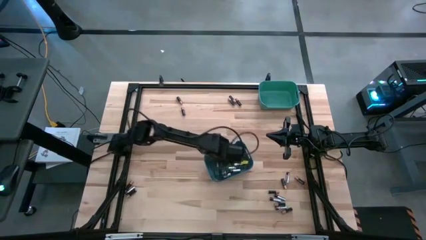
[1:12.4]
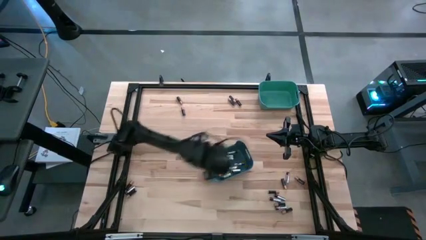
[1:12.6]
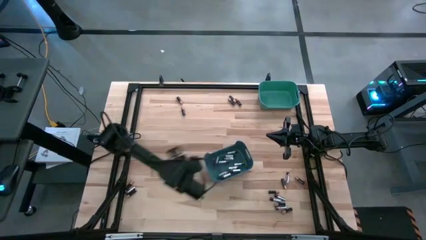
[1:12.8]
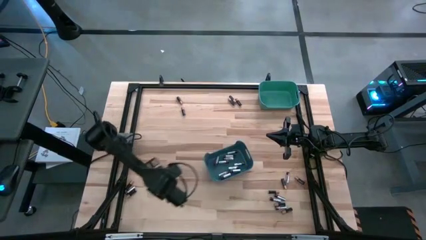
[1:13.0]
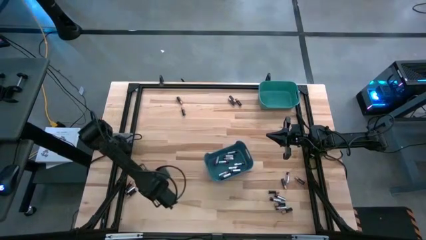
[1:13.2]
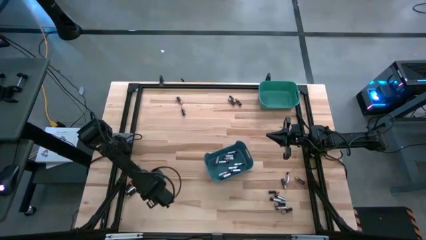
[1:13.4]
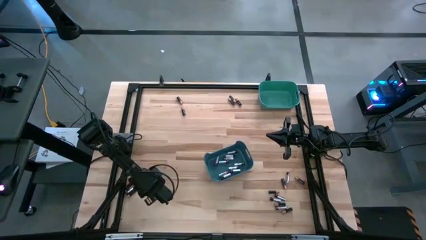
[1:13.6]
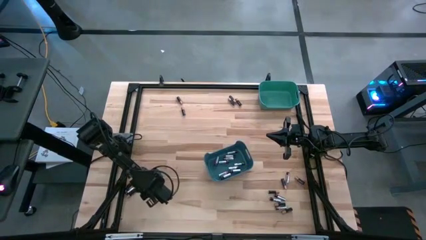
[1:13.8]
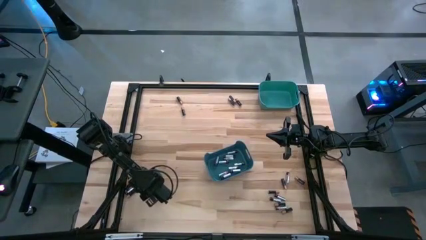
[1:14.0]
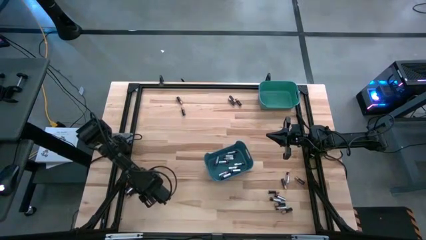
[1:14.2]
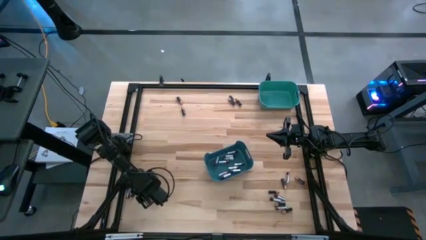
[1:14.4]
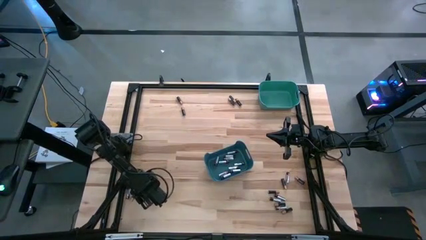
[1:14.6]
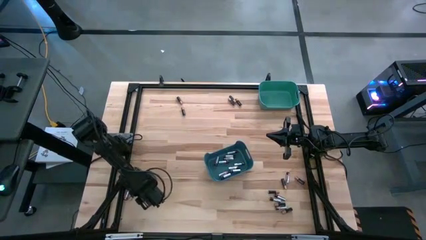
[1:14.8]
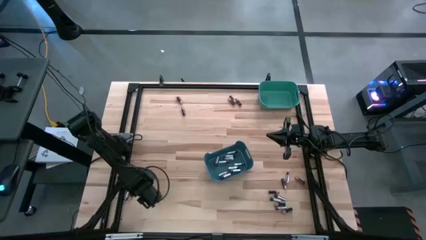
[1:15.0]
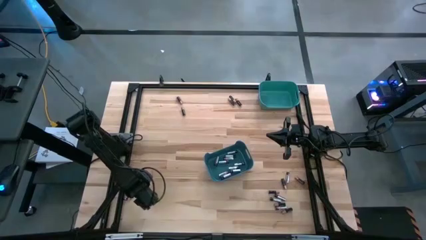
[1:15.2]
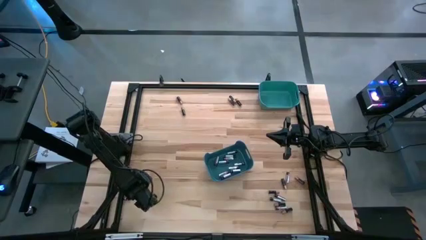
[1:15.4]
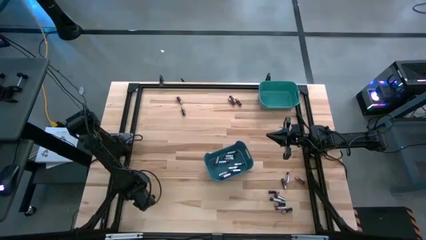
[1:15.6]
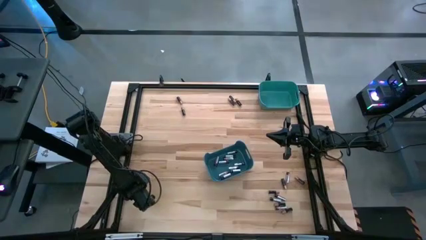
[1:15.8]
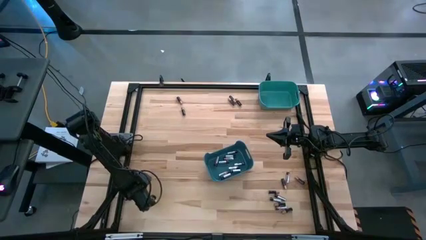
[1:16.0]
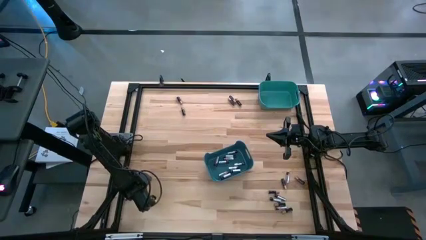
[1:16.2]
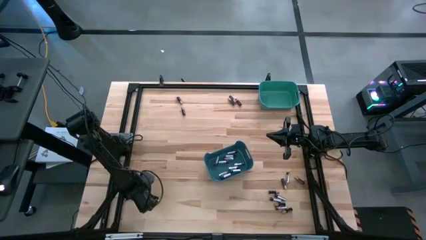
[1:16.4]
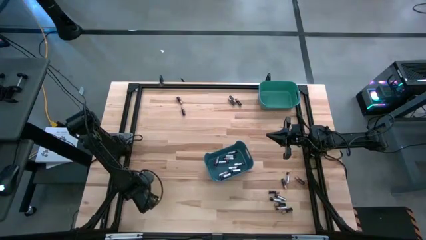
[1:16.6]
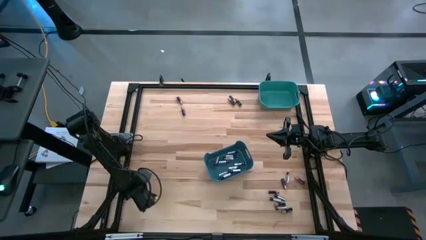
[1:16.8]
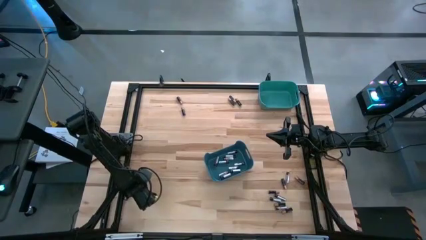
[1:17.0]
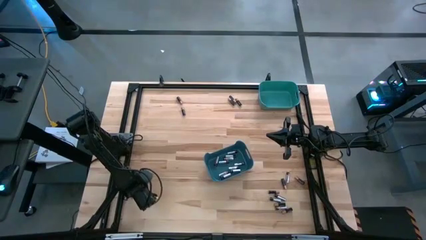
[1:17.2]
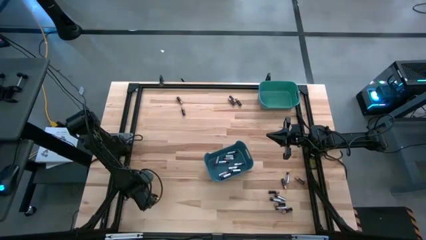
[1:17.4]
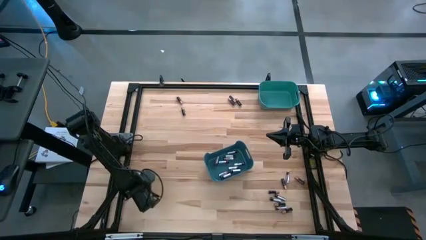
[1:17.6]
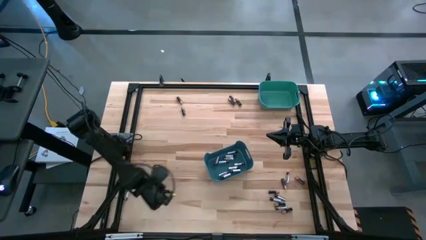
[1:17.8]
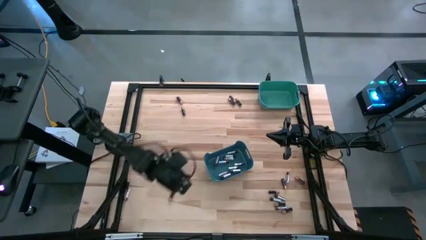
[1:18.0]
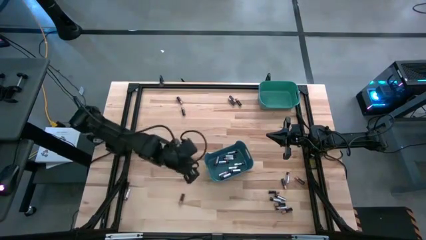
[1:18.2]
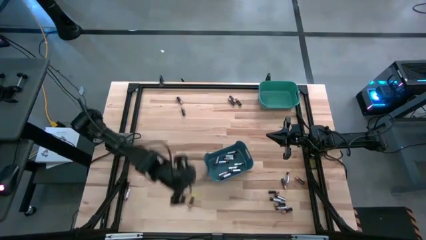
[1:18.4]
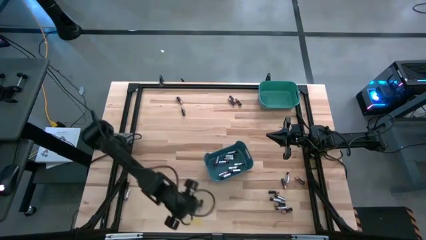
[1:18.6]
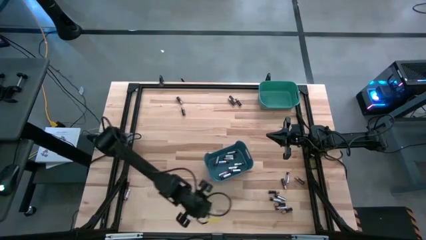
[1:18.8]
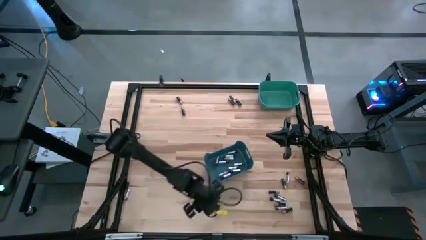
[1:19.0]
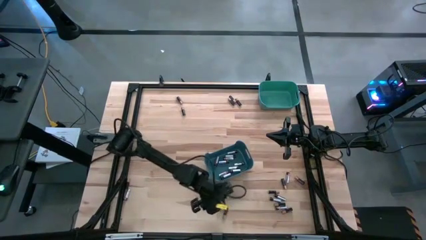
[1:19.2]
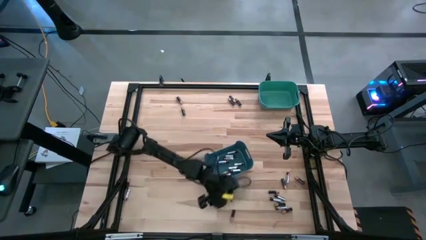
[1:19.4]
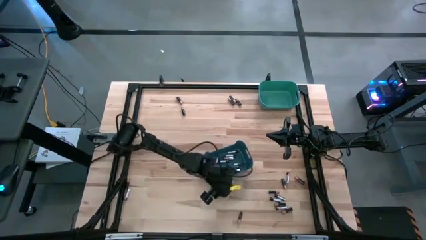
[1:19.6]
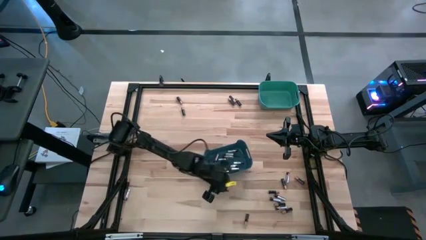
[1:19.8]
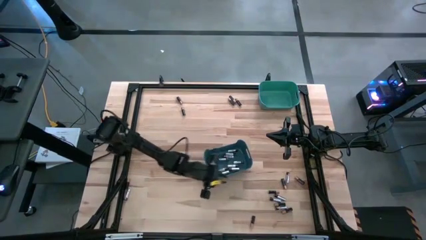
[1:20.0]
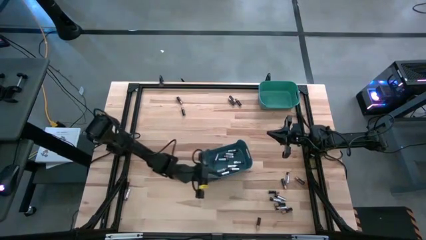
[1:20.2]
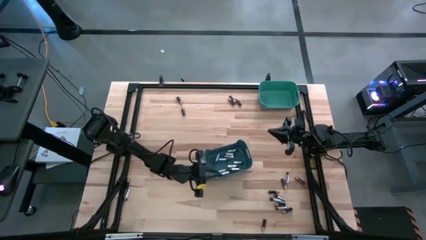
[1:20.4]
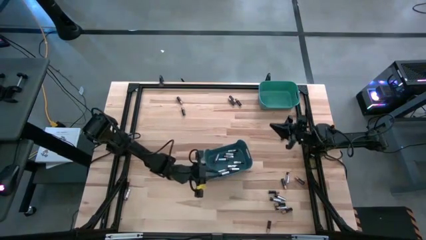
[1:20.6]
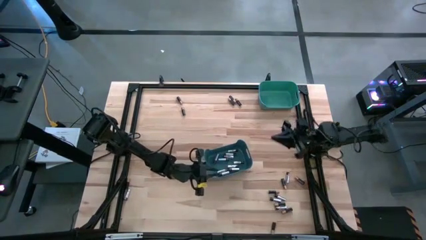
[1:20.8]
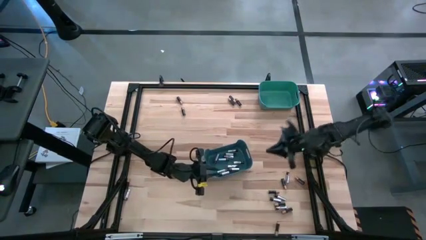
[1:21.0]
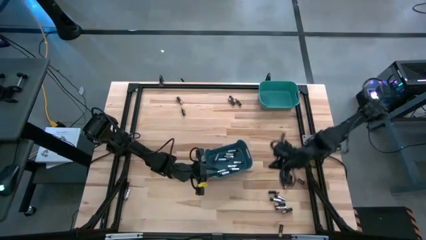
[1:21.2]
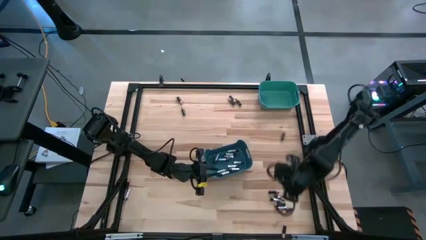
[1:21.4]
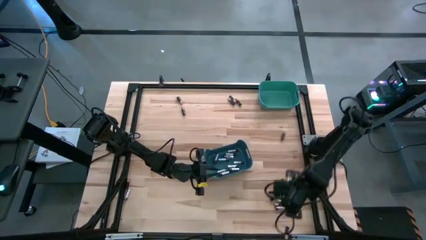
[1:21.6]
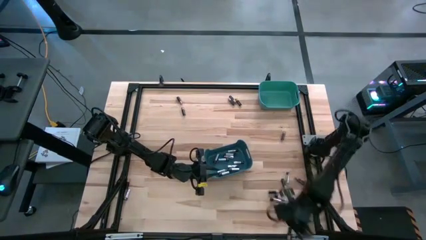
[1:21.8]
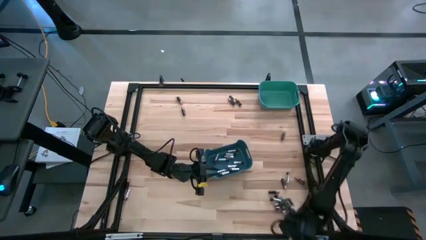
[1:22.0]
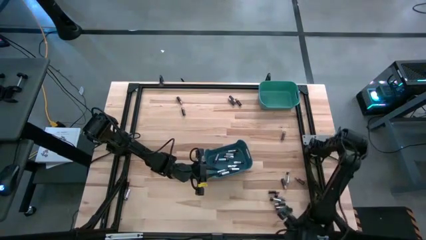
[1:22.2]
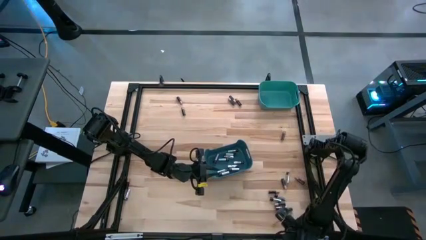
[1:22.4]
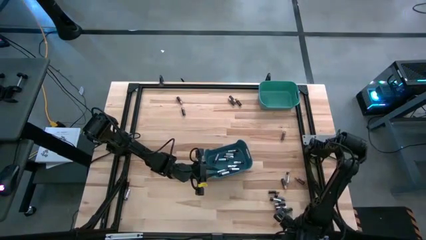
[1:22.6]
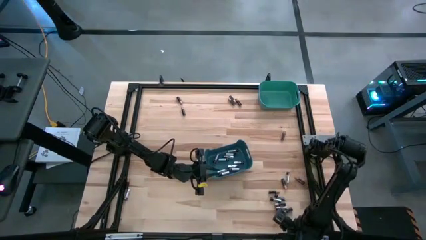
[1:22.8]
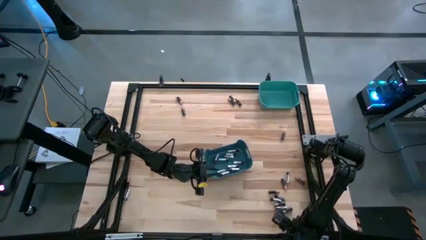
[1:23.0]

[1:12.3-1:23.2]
Task: Sort batteries
Put the black battery into the blue bin

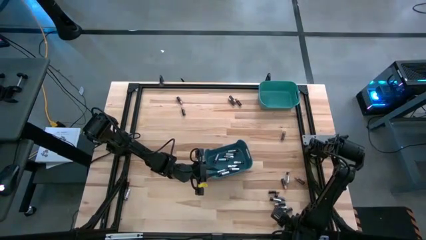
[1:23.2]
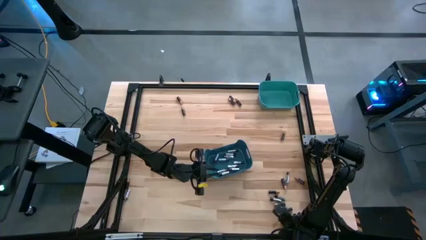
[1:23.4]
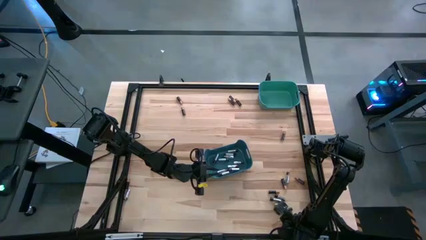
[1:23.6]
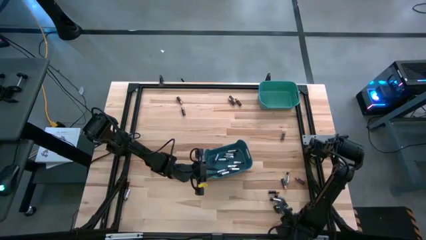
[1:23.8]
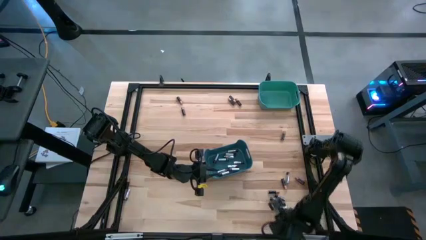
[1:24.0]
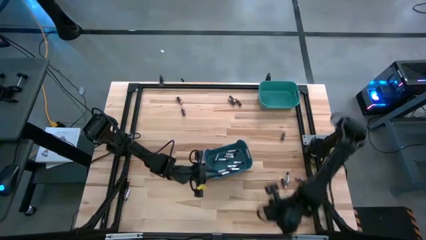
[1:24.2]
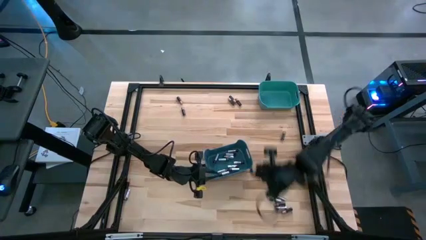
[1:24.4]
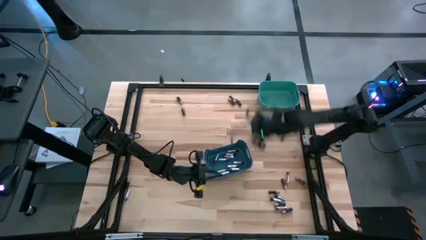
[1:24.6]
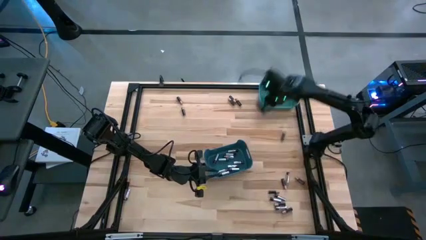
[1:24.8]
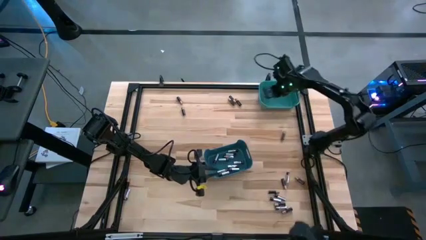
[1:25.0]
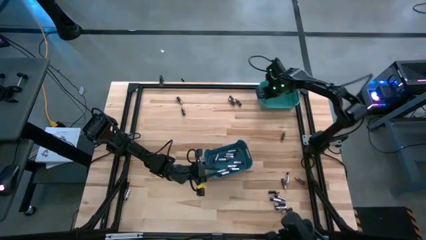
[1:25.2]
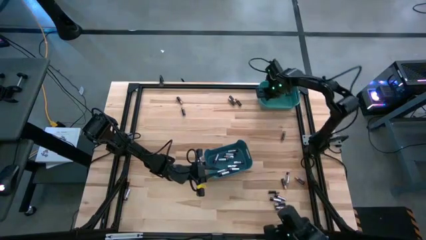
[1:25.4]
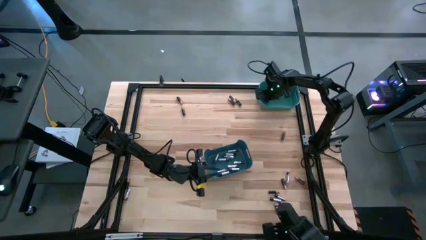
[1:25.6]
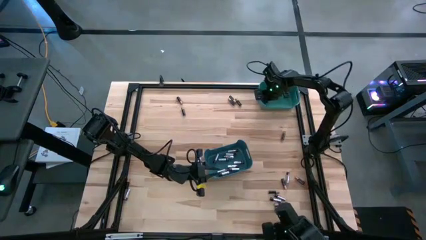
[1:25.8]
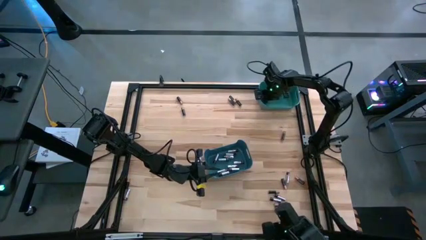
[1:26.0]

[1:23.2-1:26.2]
Put the black battery into the green bin

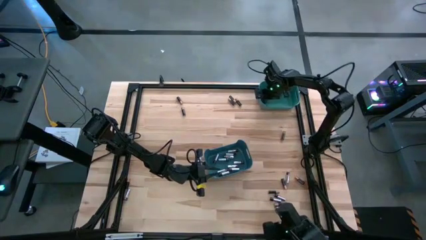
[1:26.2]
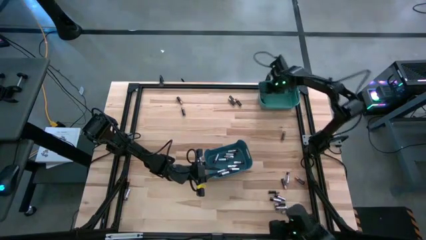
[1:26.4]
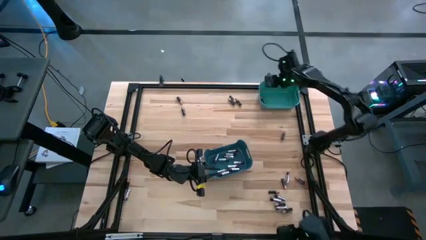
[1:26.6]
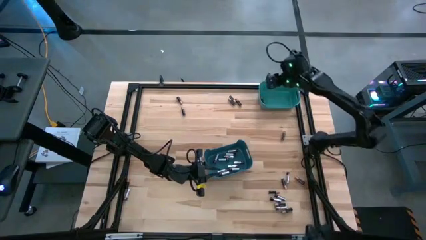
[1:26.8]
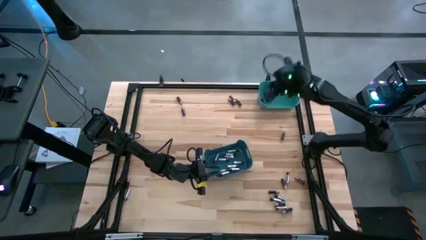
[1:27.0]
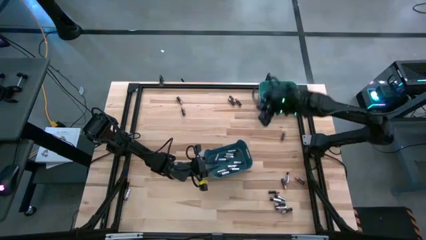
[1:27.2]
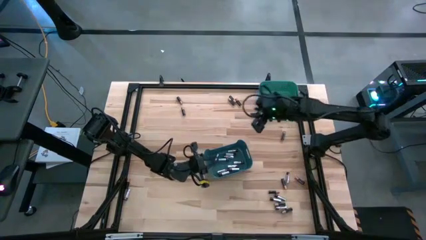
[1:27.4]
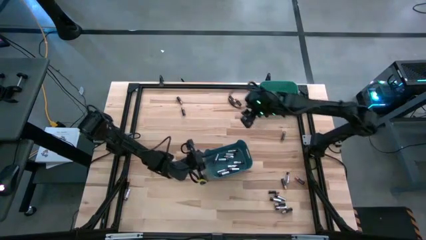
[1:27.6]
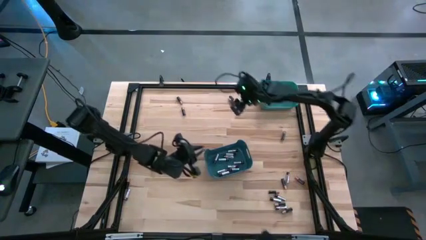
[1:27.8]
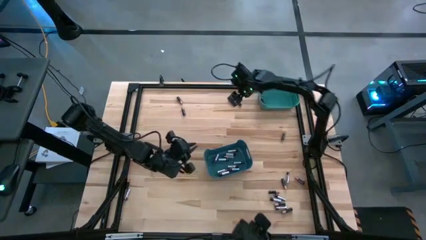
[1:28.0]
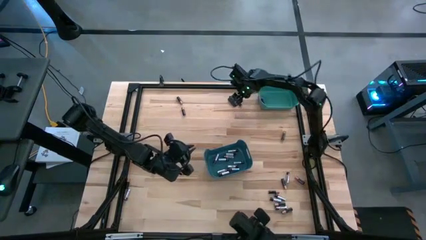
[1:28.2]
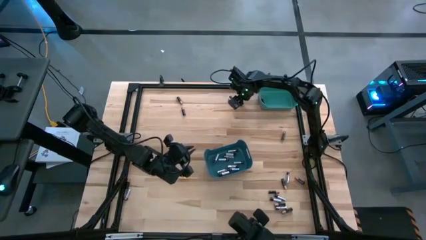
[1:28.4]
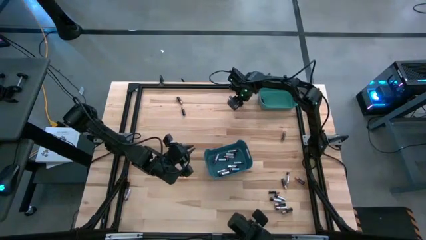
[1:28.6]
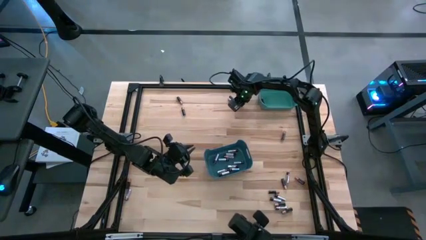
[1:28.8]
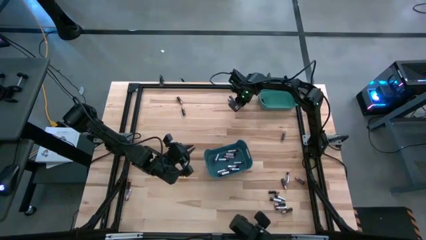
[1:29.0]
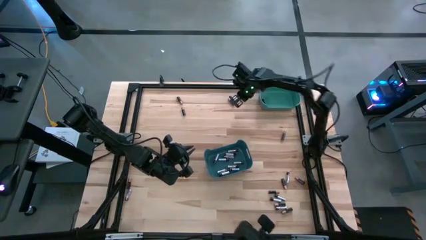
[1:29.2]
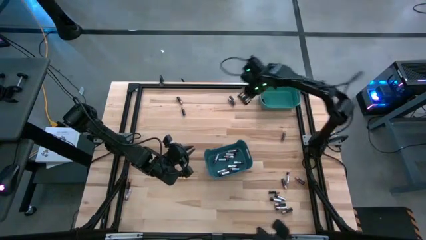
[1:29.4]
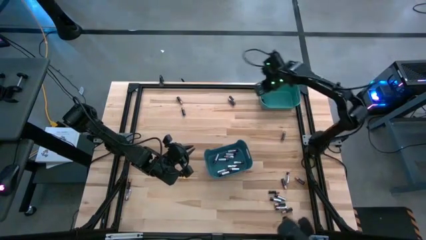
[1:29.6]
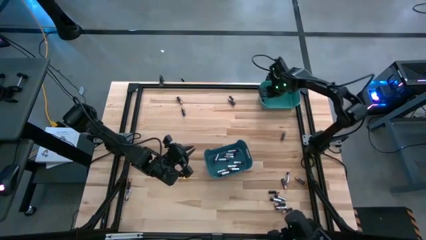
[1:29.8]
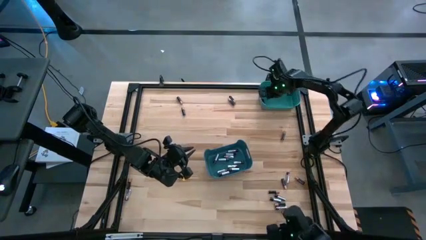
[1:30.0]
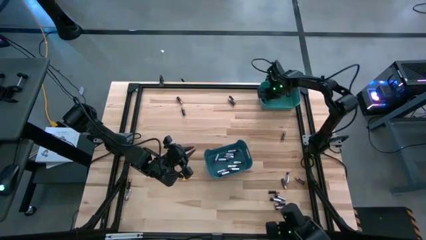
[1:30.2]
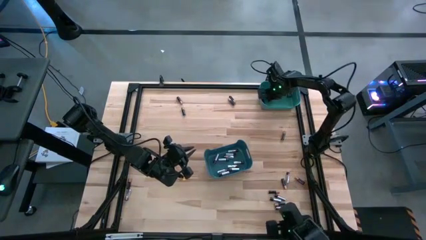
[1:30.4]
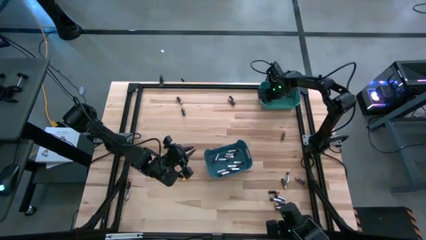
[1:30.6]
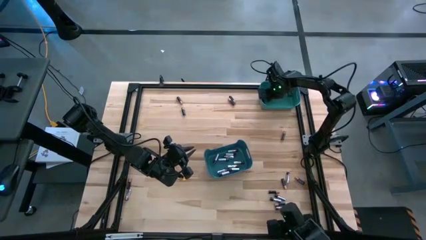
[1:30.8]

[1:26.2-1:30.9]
Put the black battery into the green bin
